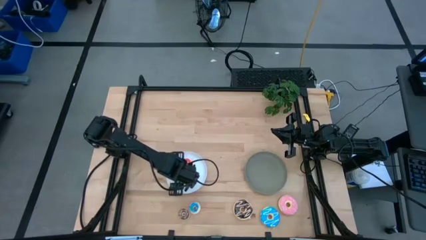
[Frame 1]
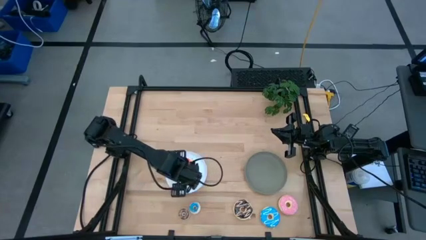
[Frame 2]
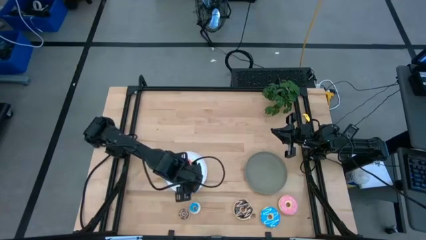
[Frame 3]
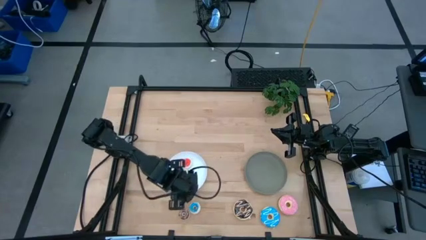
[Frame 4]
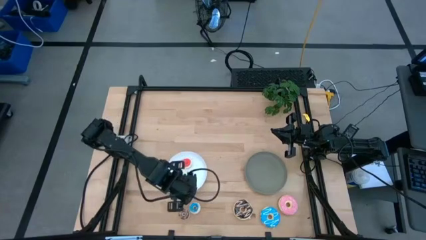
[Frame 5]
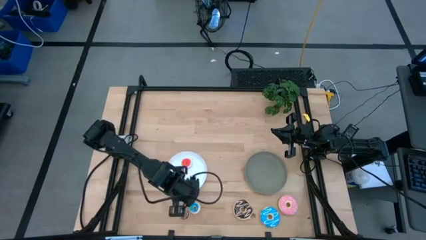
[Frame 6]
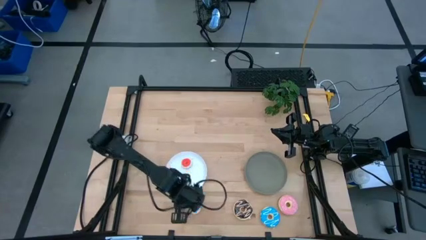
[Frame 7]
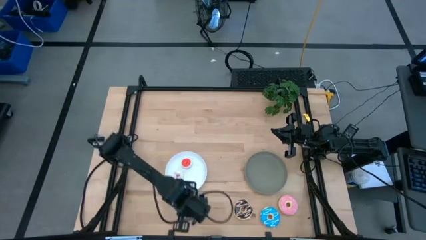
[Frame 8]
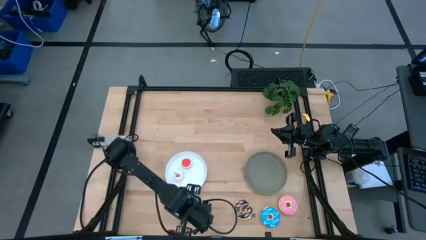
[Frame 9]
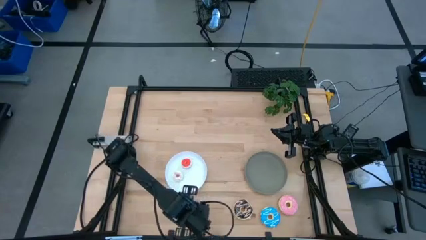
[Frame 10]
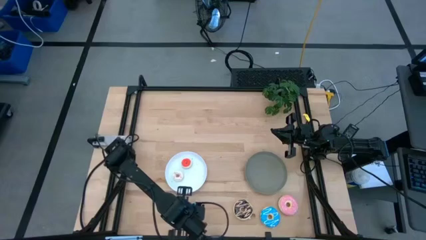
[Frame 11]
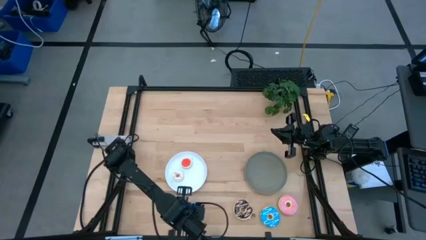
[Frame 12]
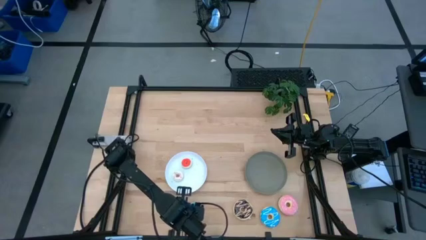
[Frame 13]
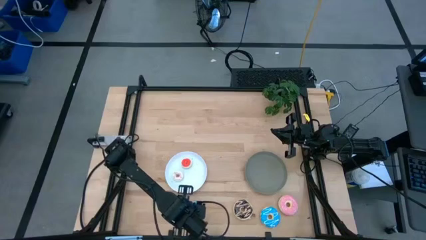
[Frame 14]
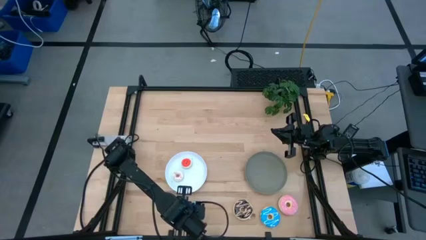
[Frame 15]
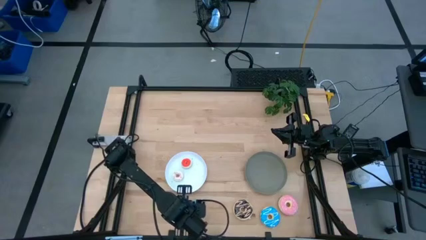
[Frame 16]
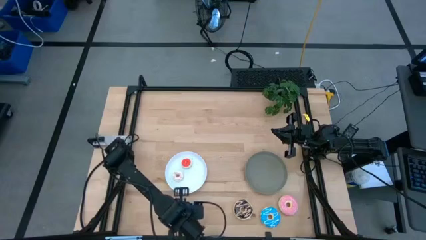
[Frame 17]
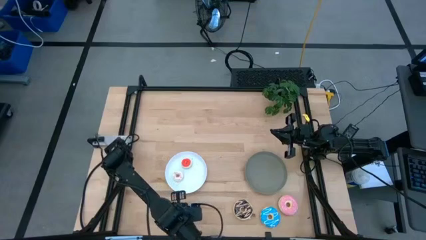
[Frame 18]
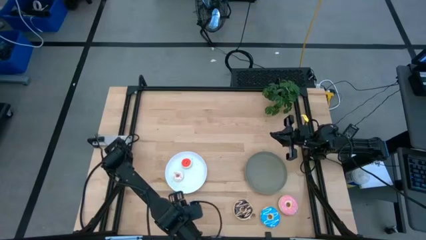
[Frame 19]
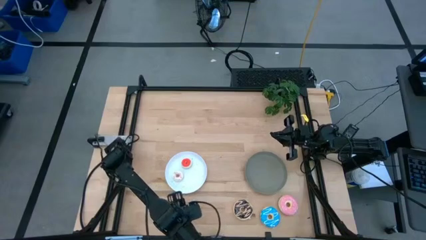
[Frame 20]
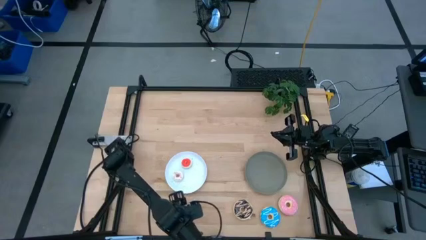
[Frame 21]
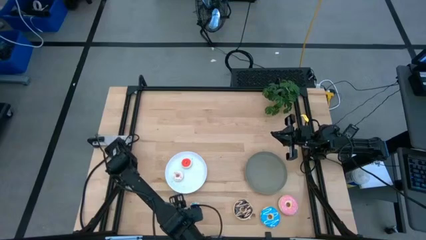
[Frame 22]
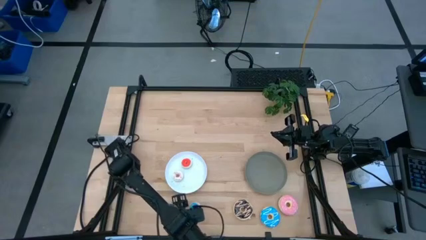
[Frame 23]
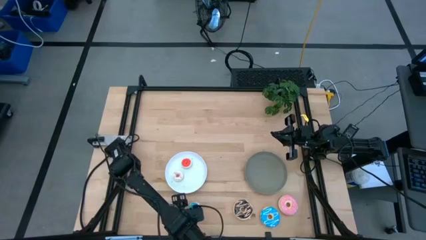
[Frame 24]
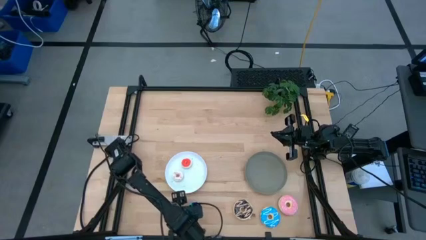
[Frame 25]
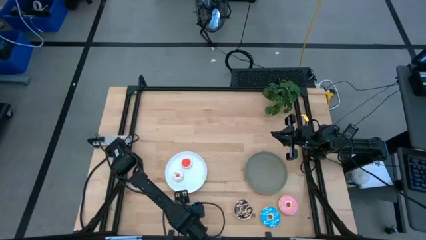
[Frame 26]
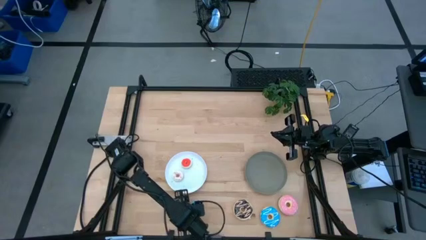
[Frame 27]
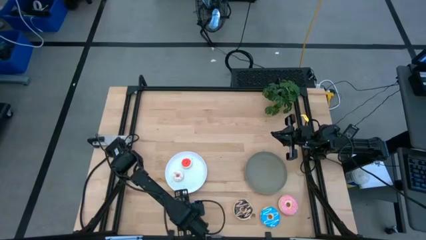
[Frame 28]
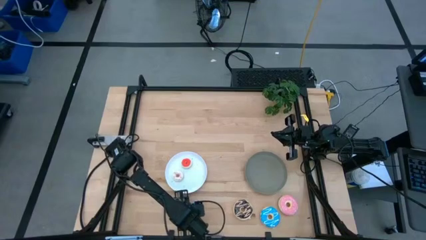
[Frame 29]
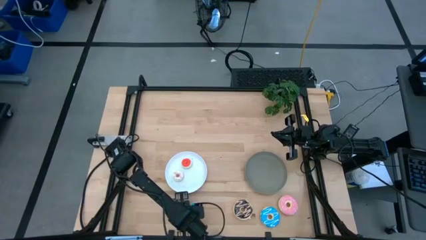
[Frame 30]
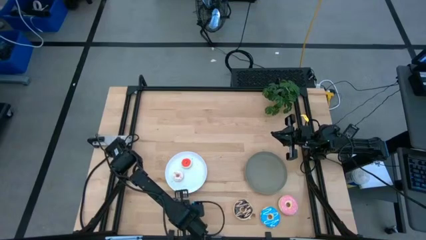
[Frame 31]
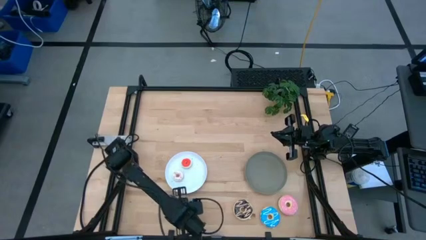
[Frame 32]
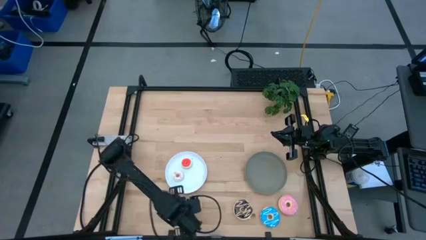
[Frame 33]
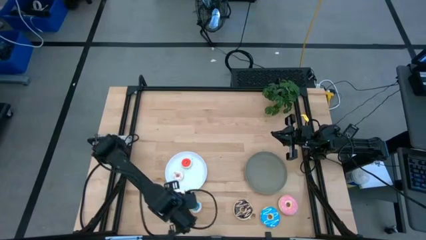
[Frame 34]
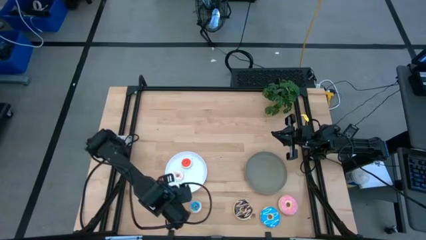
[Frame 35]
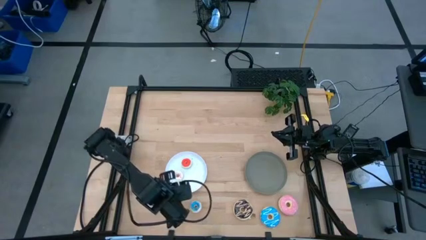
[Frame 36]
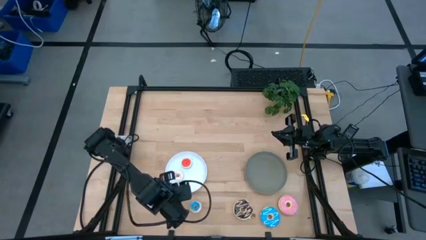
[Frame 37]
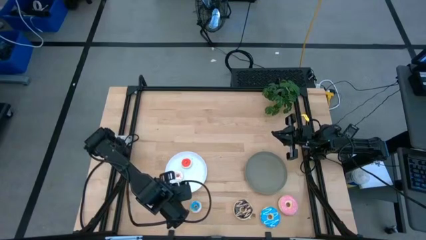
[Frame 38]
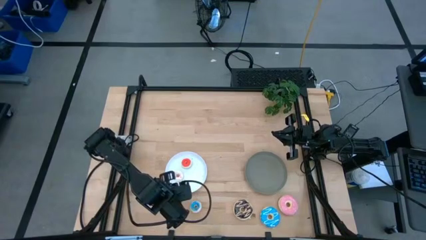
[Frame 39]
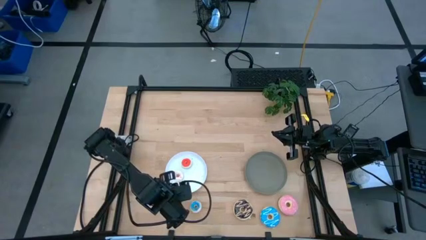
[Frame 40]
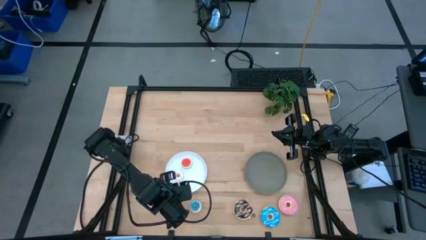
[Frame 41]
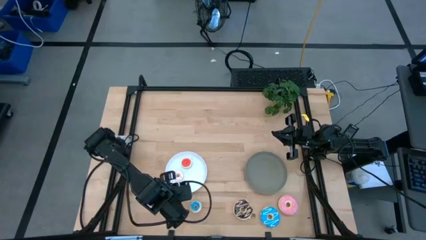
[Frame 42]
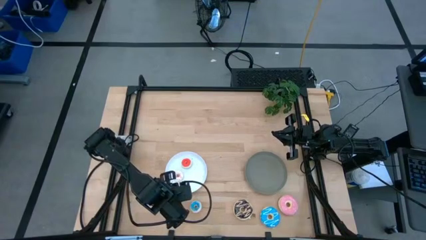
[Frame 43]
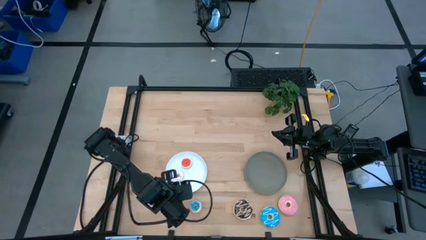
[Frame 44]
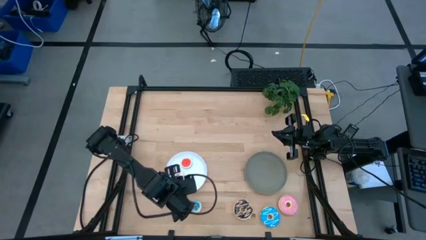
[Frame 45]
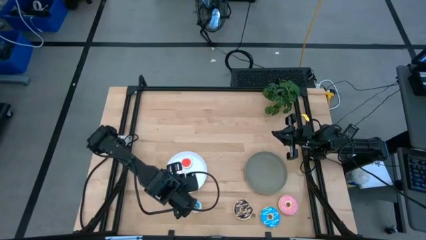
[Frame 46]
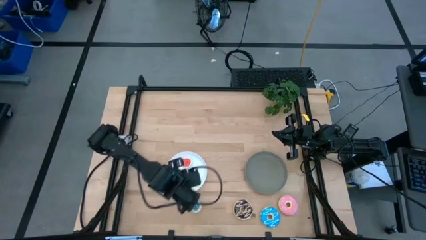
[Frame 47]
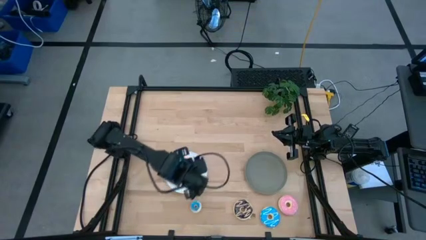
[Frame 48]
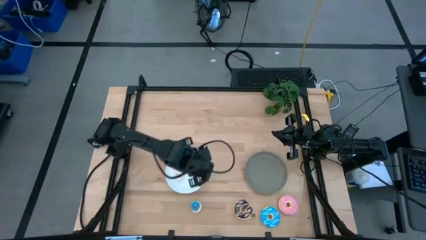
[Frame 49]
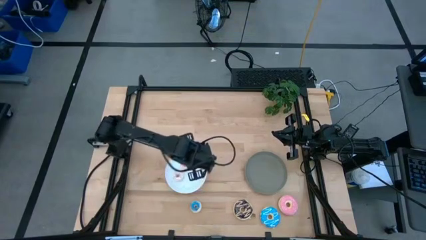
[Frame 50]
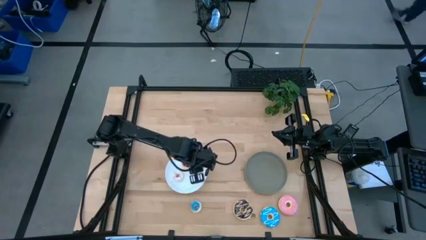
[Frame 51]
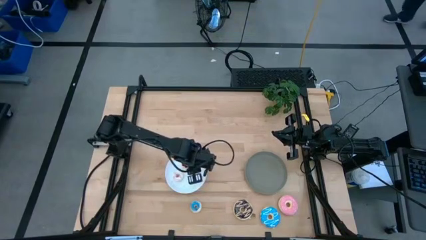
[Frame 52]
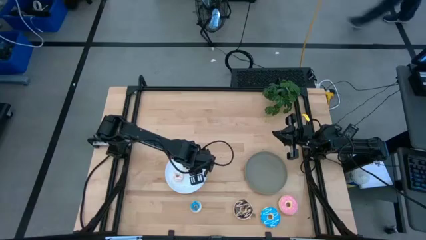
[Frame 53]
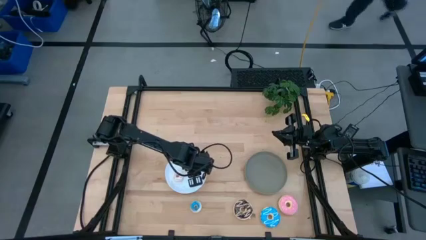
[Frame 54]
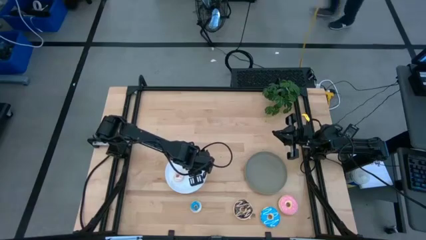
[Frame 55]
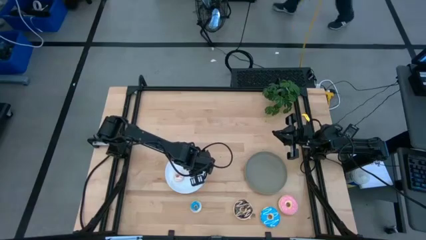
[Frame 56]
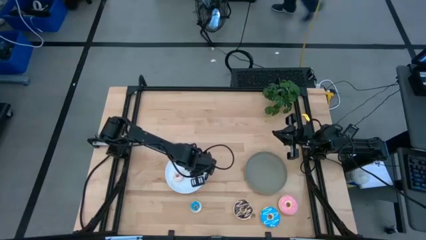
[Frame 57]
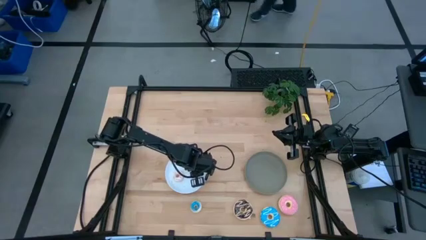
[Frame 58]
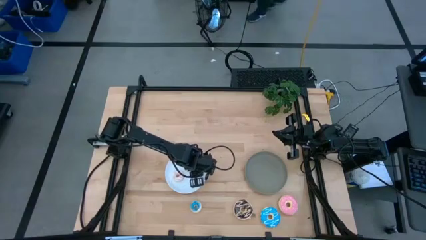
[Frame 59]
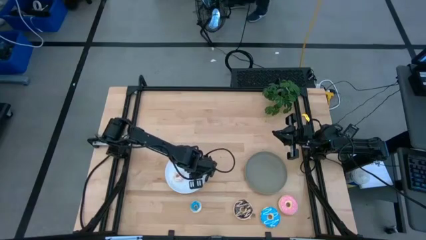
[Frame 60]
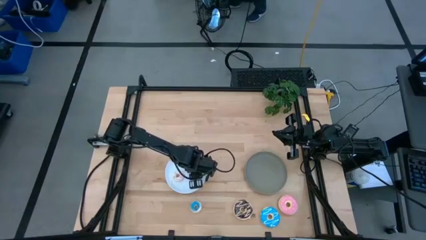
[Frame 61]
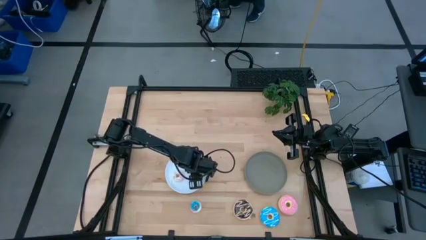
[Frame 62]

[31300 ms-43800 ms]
Task: Pick & Place donuts
Put the small brown donut on the white plate
